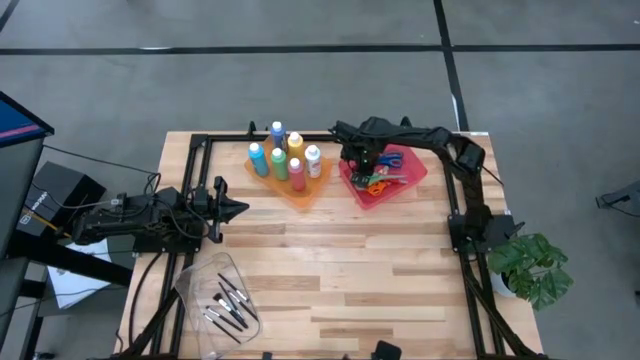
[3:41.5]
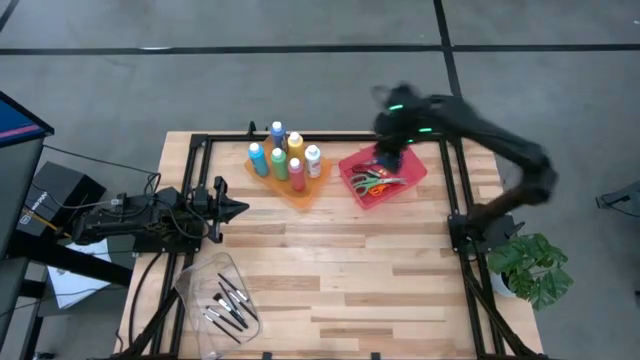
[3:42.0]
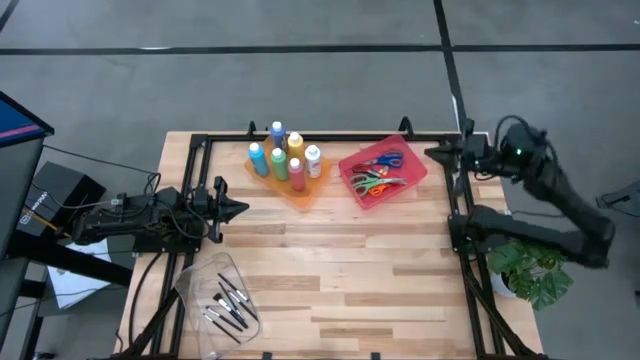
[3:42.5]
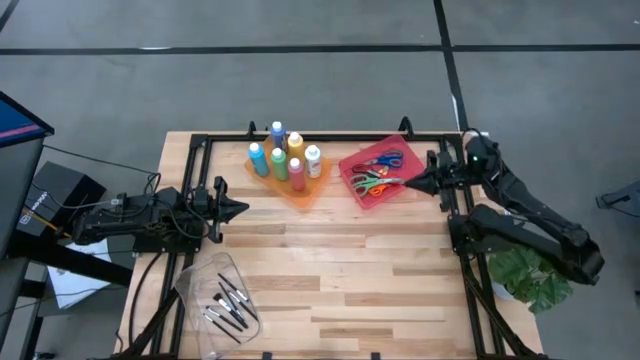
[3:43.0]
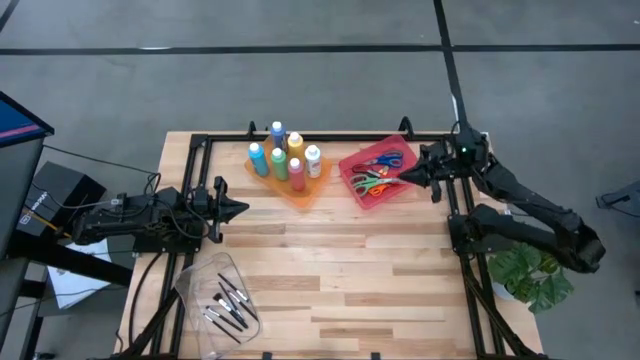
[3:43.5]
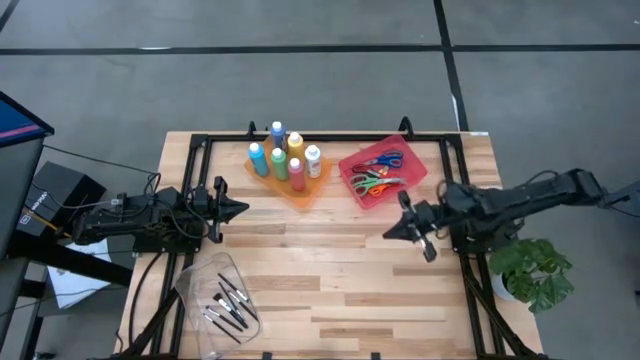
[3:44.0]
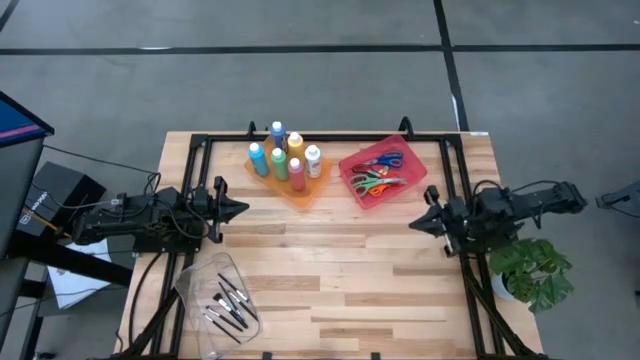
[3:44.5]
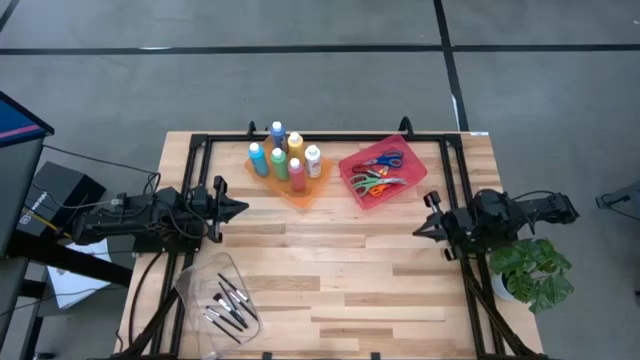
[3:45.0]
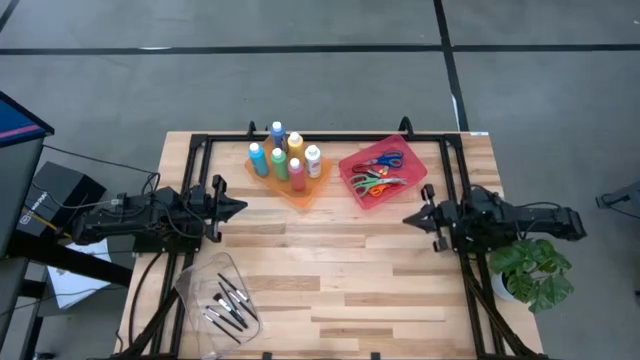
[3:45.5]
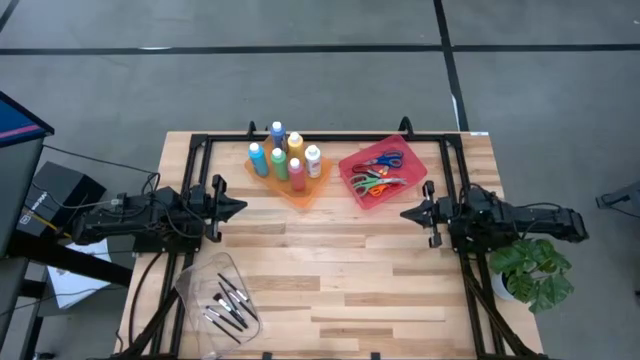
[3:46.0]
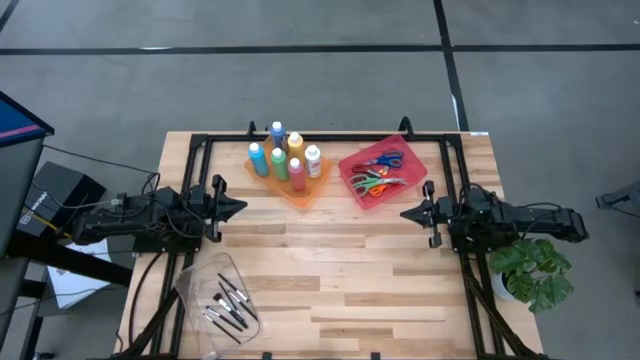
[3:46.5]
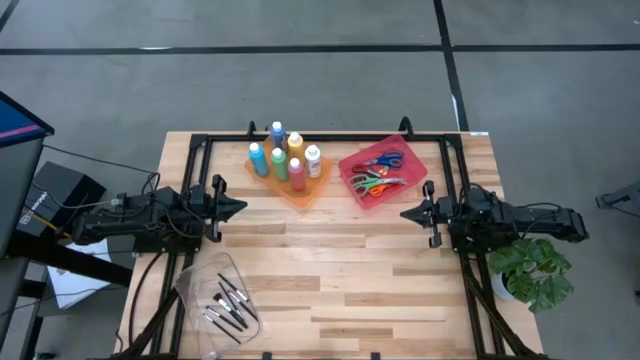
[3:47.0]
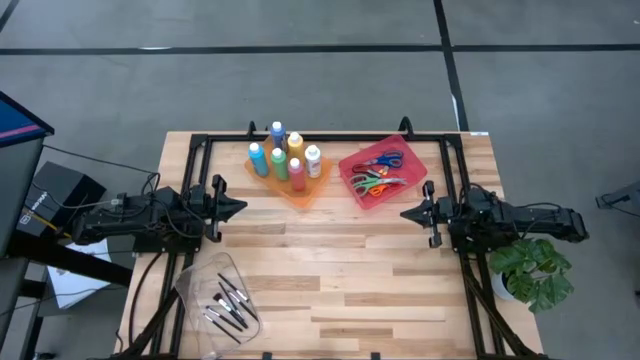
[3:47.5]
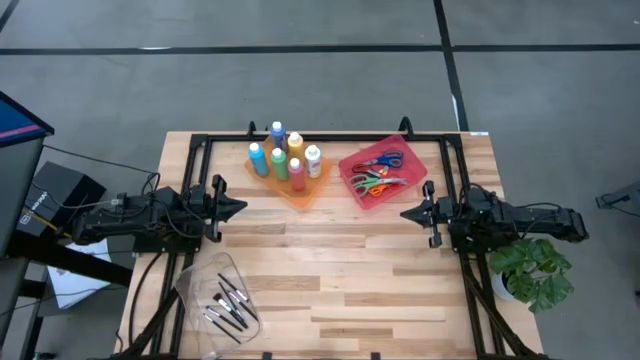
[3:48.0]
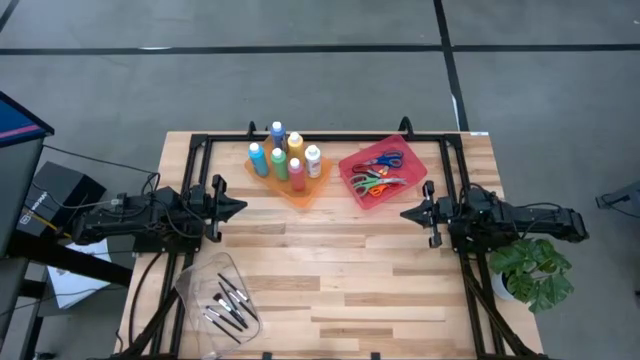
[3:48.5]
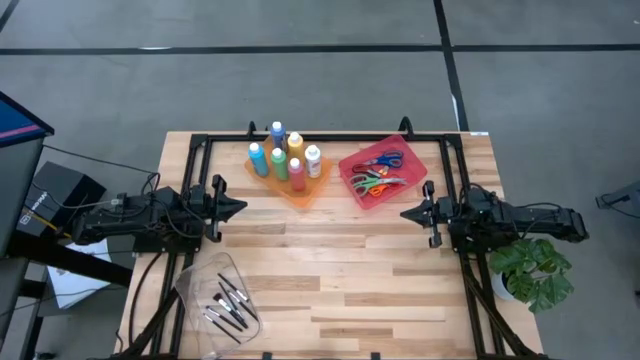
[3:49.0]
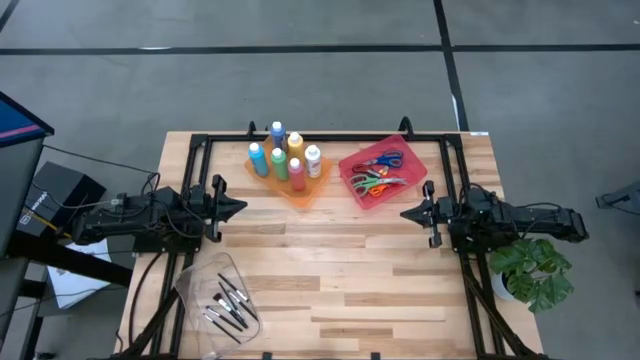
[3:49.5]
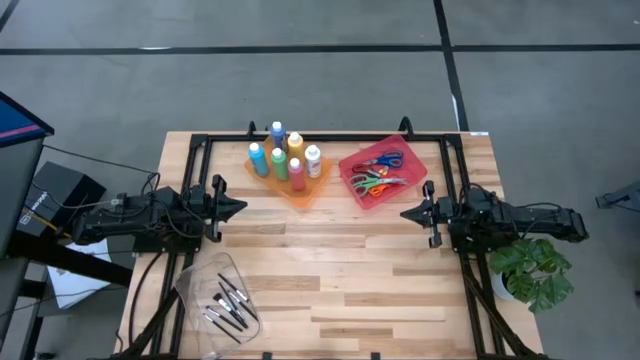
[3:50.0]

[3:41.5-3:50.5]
Task: Pick & Place Paint Supplies
Return to Home Position

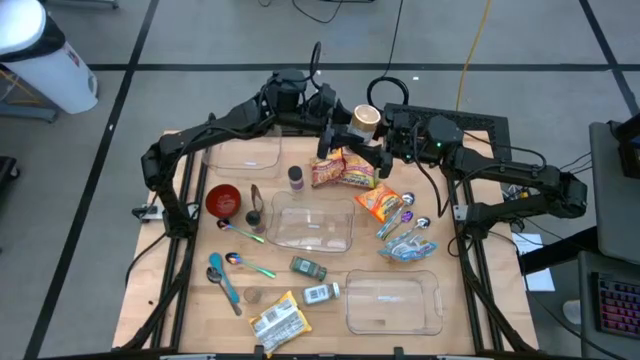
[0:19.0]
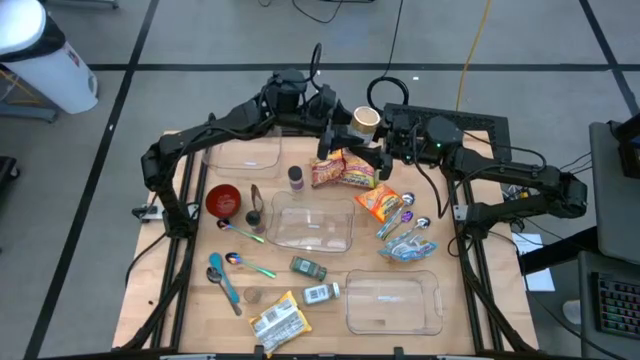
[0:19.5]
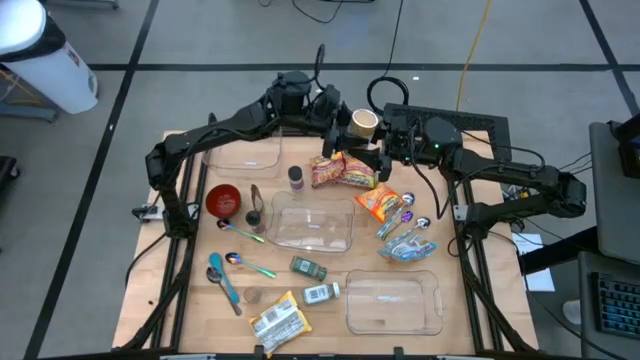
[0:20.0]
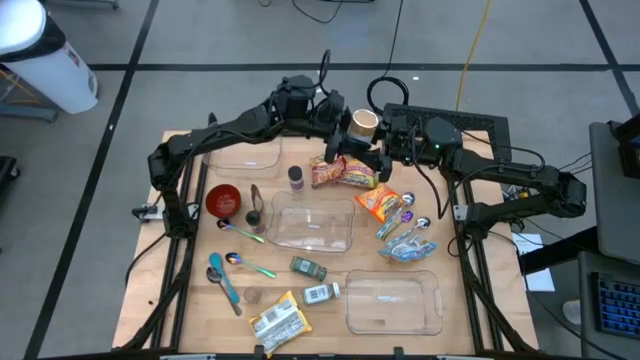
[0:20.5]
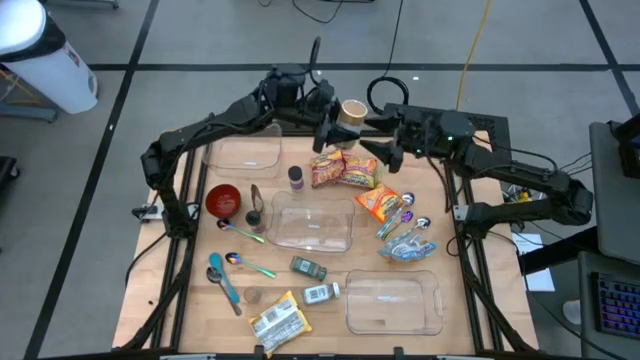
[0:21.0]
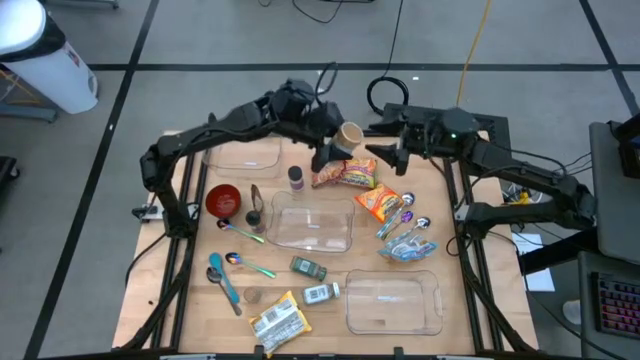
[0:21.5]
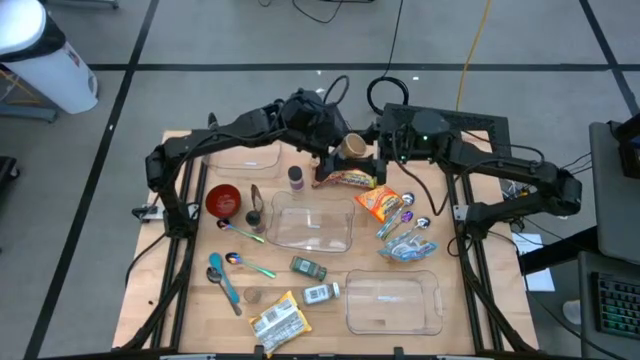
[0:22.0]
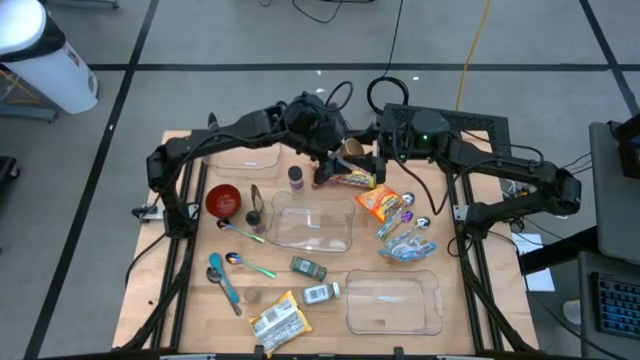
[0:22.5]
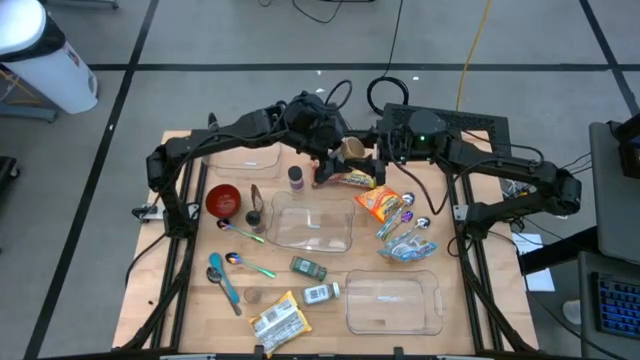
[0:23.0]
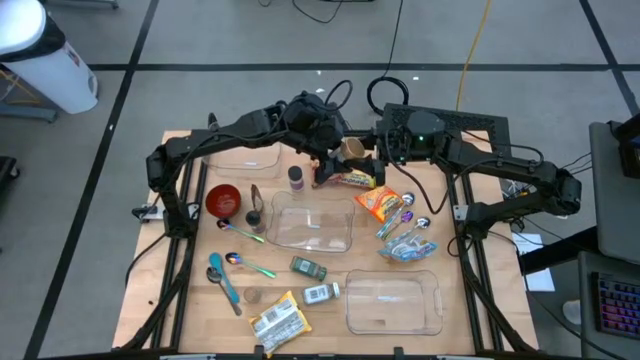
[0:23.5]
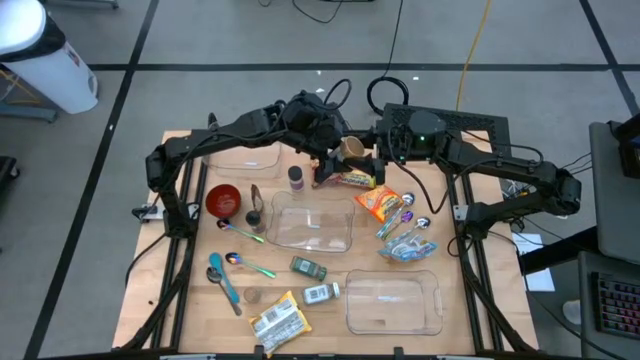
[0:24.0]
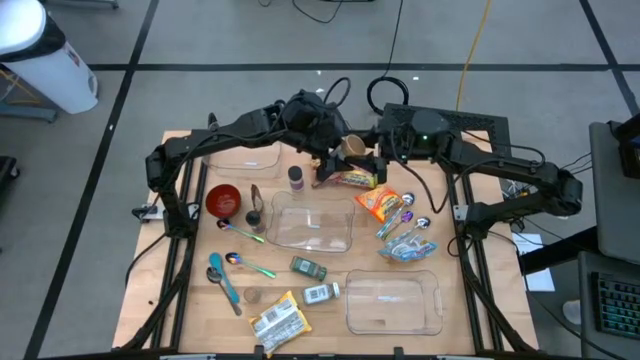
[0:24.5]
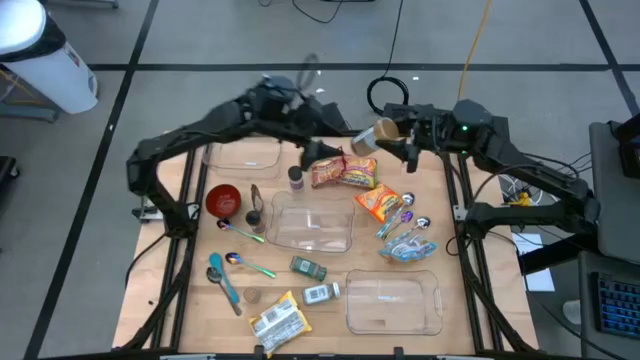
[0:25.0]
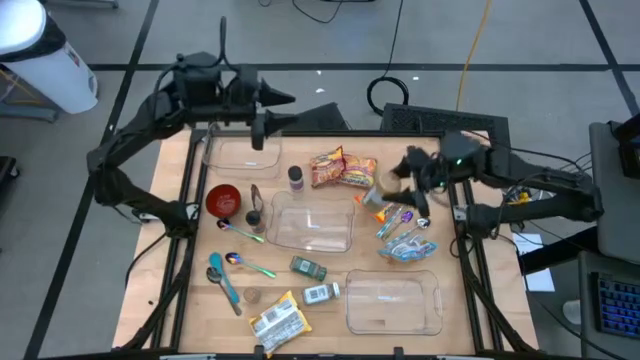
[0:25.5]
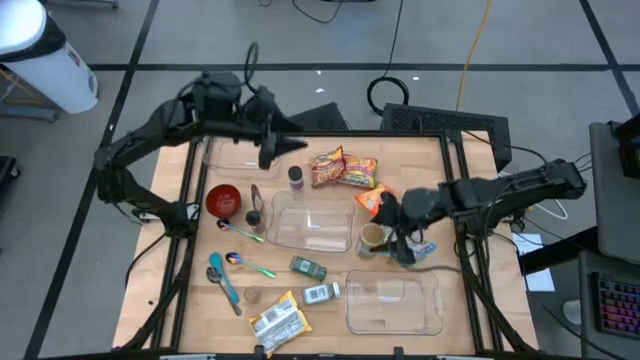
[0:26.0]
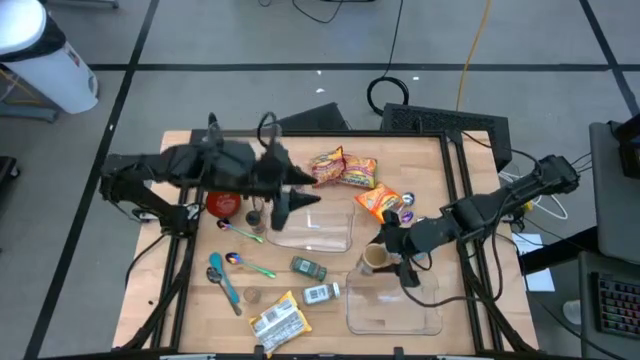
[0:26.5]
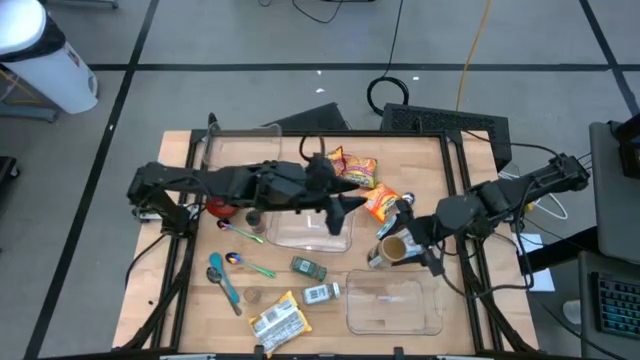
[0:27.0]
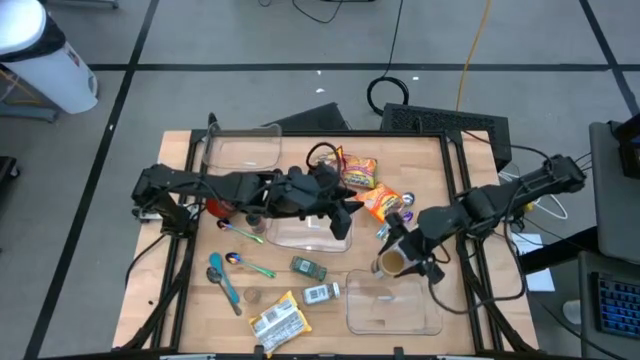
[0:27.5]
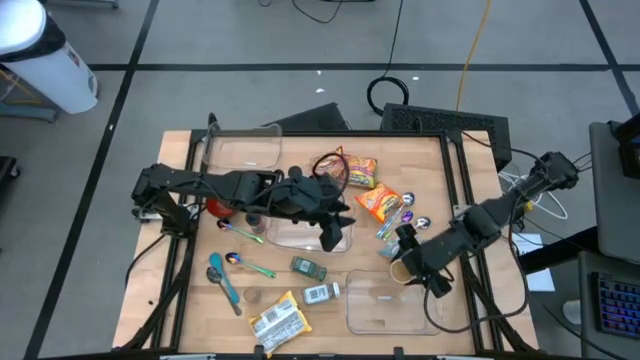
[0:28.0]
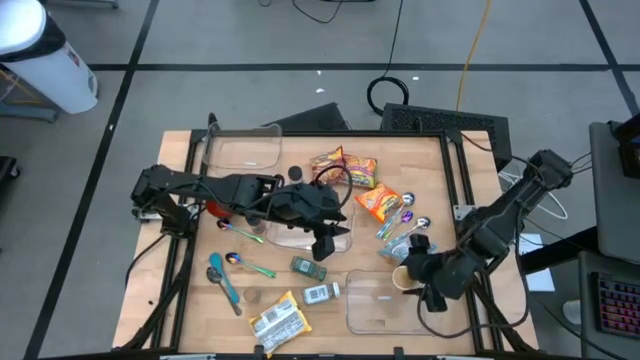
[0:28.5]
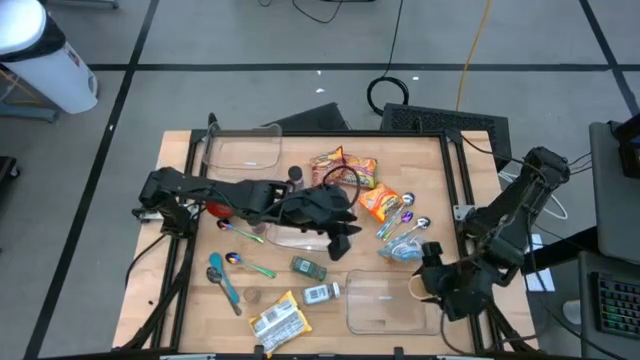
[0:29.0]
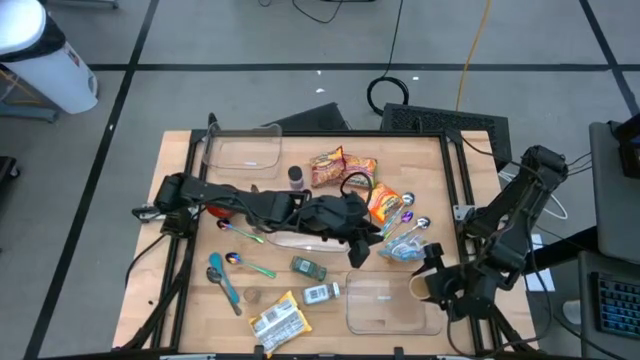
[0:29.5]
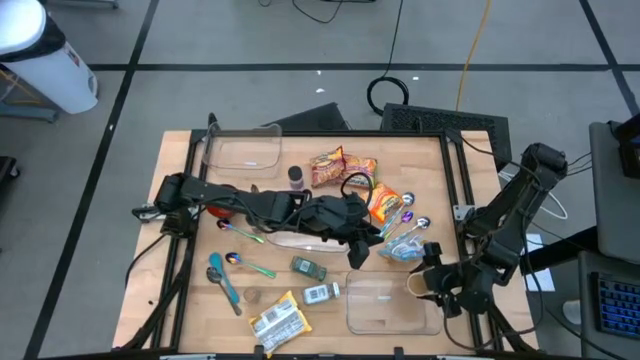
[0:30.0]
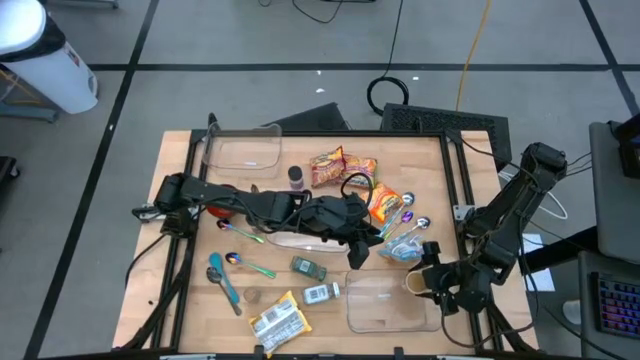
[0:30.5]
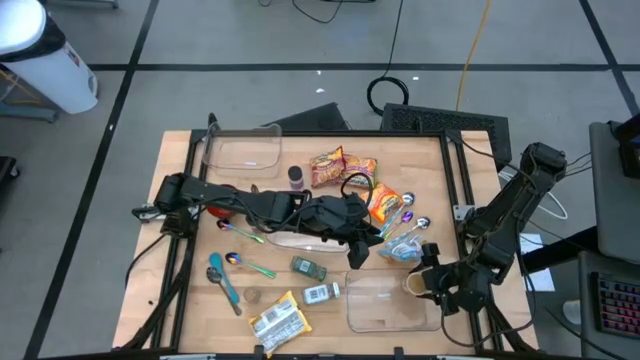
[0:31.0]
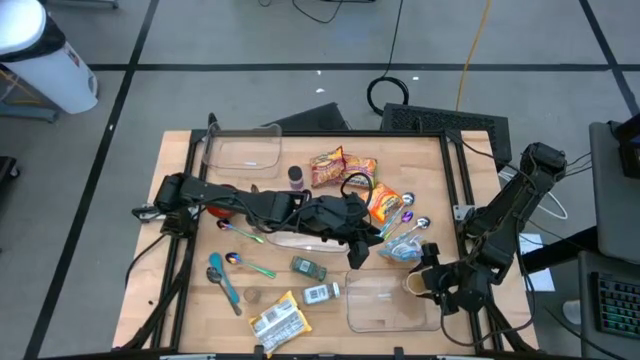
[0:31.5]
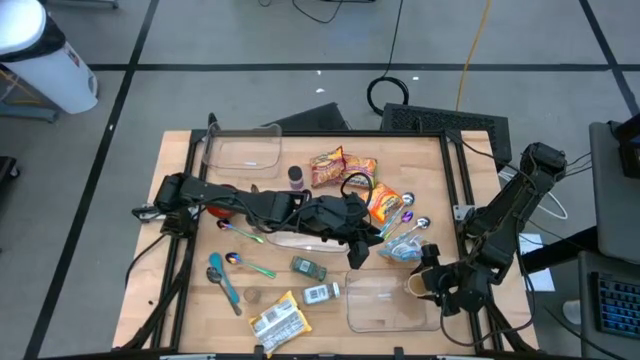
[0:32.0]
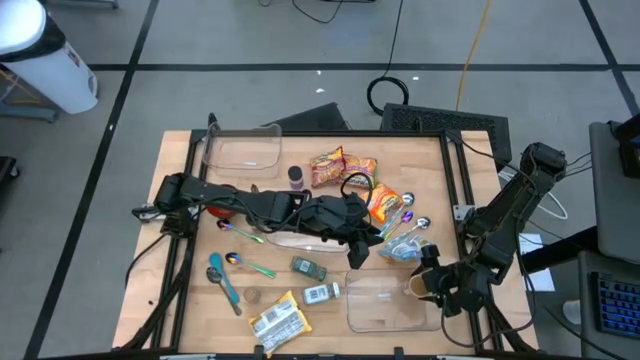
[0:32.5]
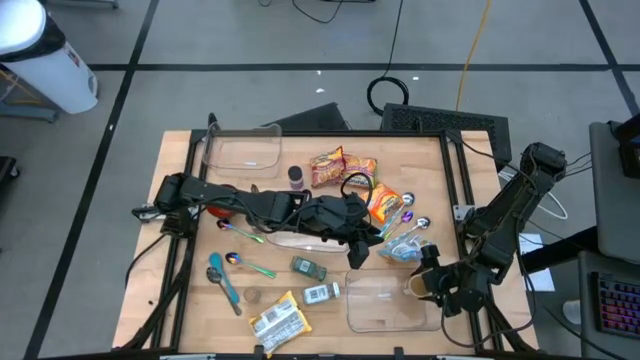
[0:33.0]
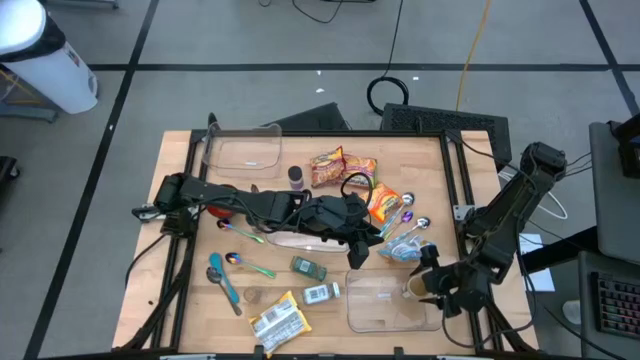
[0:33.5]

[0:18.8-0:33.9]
Task: Pick & Place Food Item
Put the gold seasoning bottle into the bottom transparent bin
